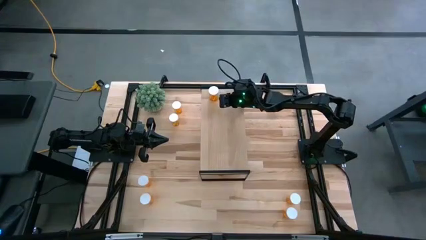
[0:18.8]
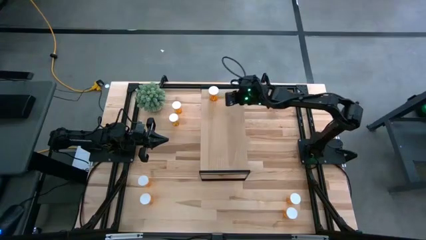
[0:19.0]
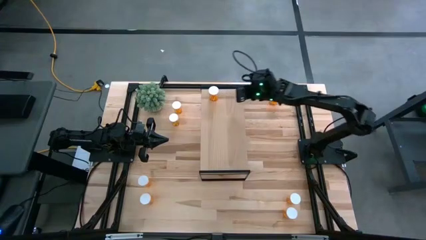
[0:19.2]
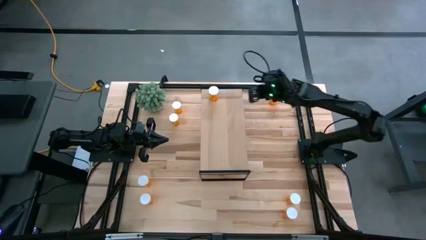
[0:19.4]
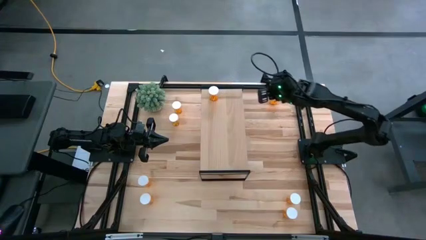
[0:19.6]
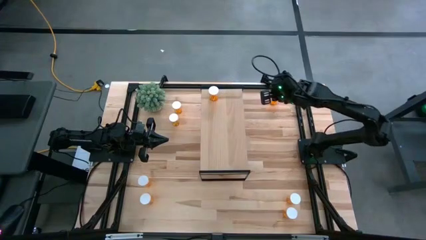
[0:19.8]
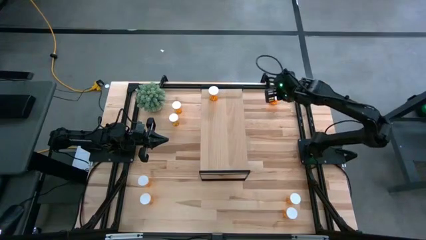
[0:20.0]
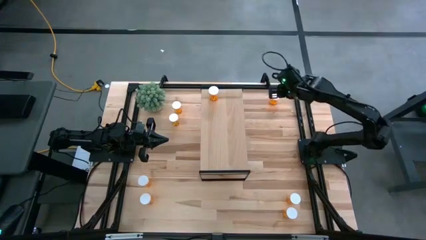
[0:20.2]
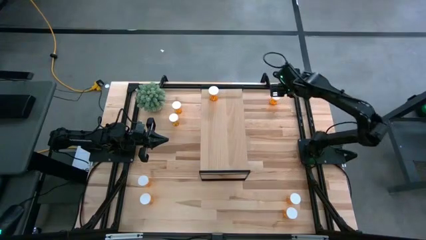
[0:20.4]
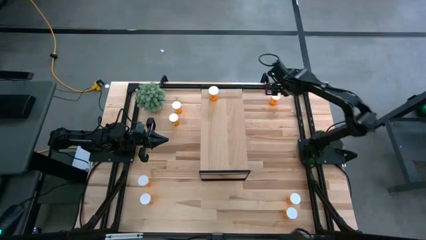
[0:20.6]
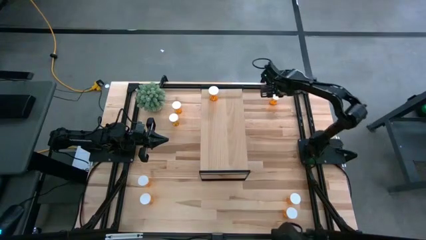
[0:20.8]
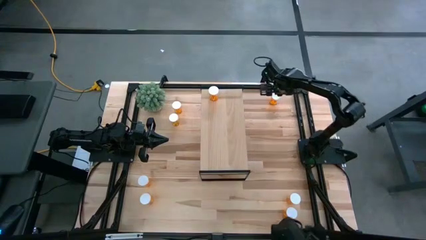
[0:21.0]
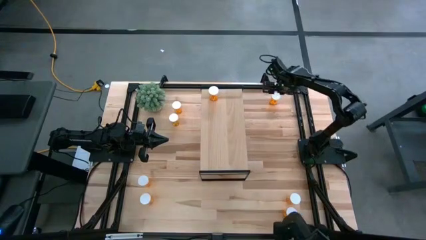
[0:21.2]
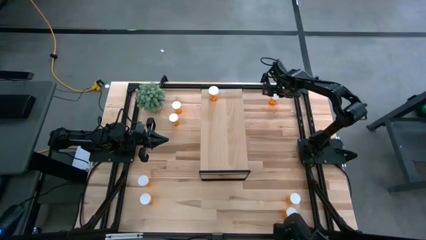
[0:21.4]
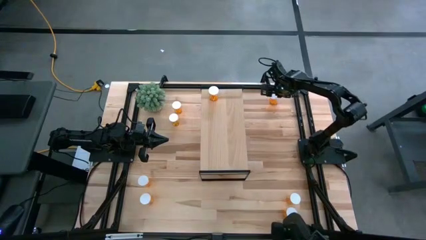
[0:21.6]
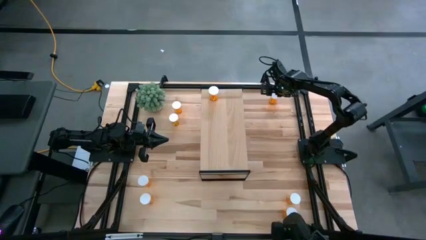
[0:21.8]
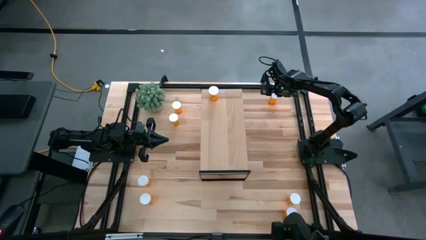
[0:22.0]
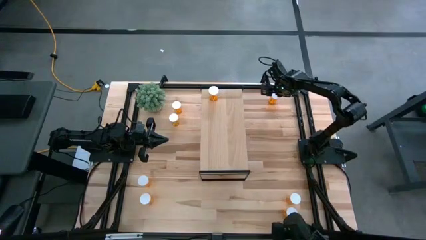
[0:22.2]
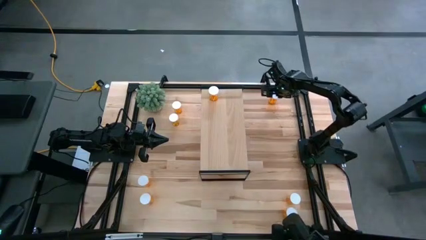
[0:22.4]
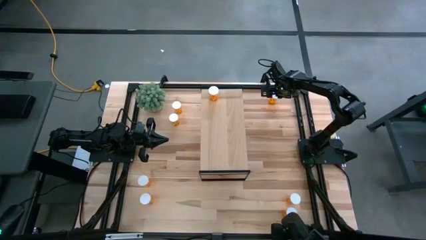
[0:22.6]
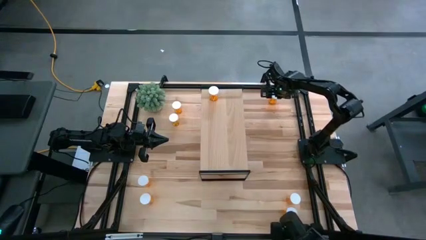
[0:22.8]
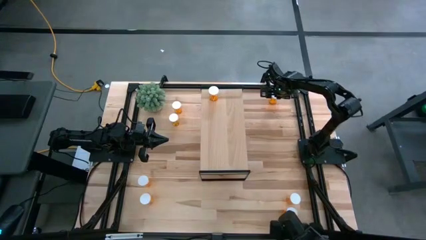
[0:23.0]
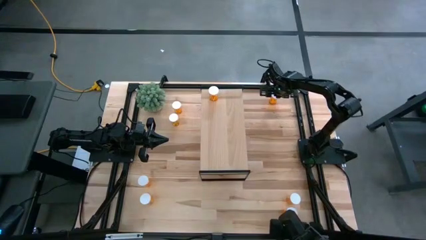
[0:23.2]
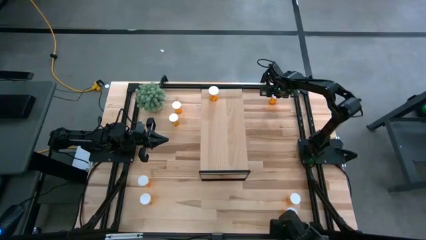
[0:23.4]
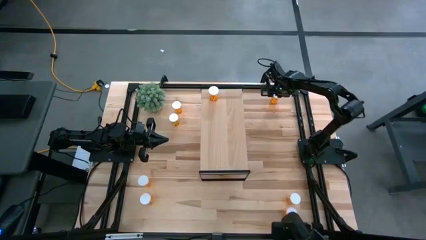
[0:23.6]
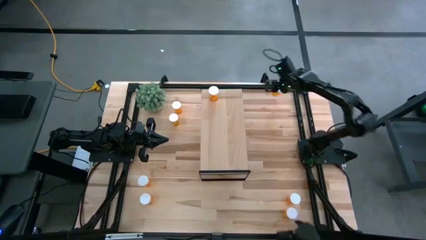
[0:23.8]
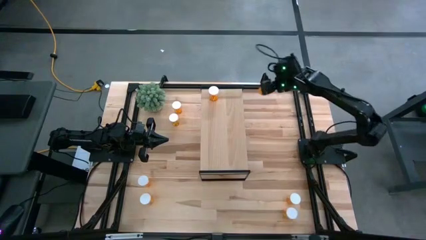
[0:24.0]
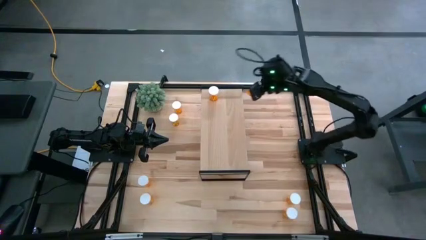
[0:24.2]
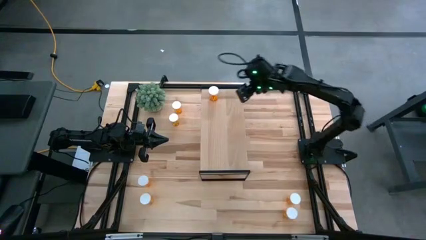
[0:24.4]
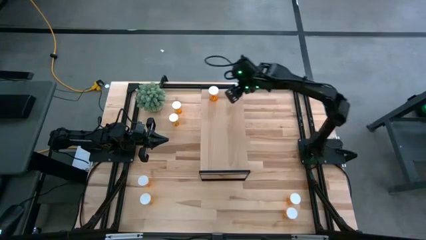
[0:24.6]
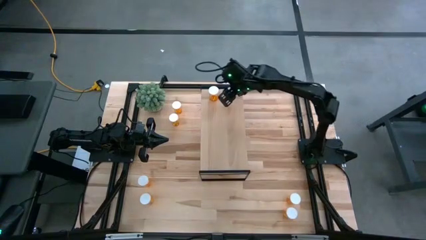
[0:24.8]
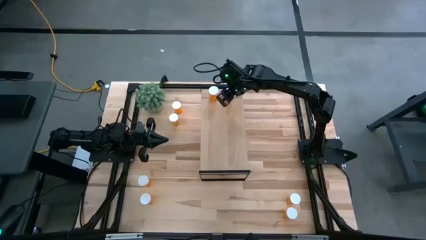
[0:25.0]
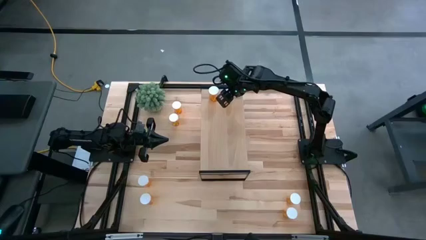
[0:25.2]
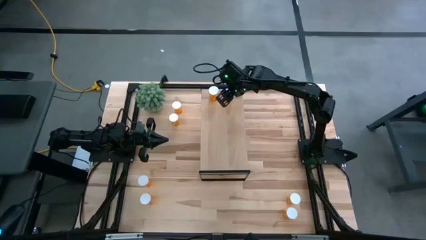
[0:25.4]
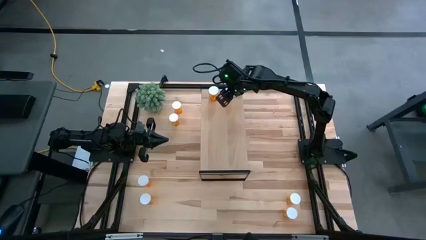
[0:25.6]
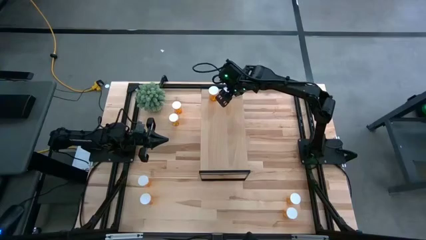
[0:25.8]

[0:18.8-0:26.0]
Task: Pick and place medicine bottles onto shelf by color
Put the orange pill bottle on the shelf

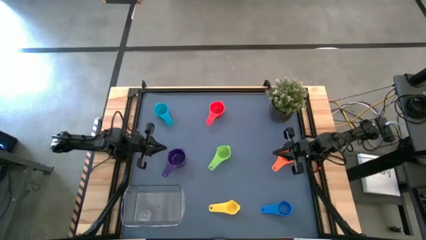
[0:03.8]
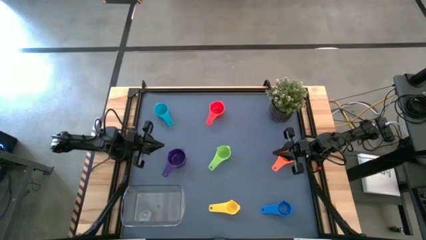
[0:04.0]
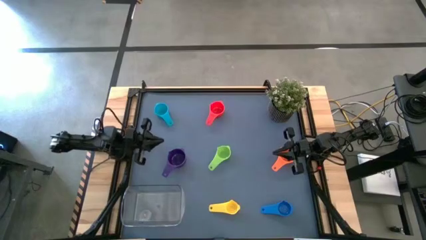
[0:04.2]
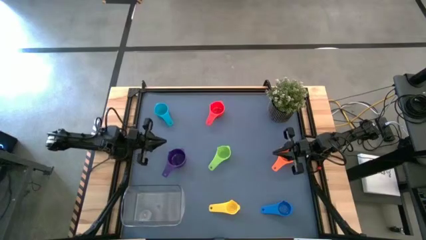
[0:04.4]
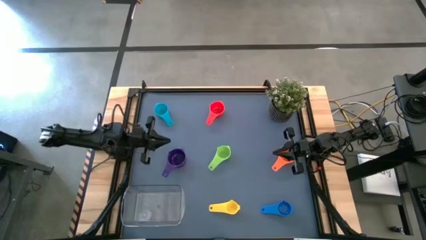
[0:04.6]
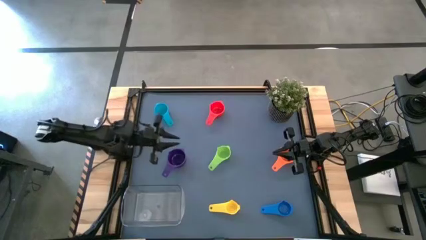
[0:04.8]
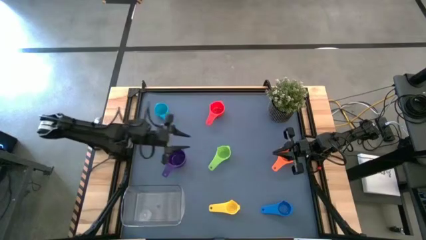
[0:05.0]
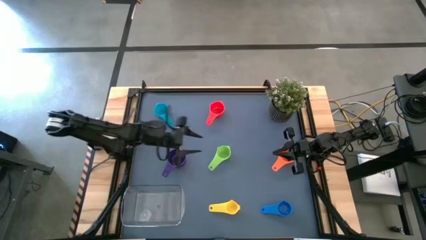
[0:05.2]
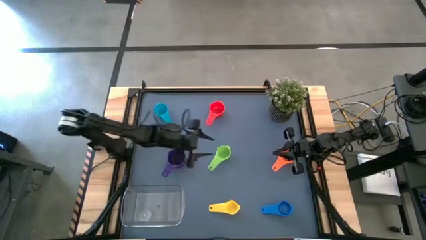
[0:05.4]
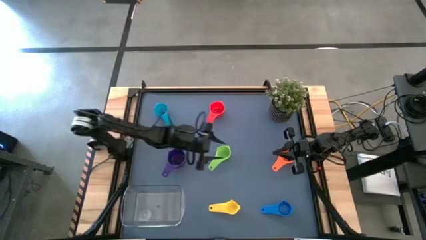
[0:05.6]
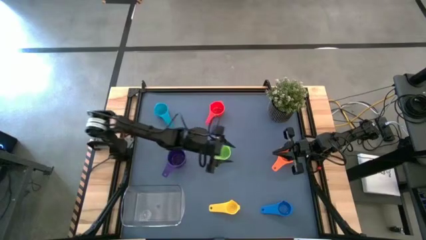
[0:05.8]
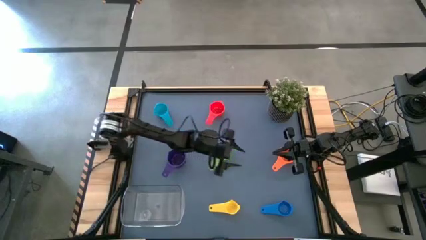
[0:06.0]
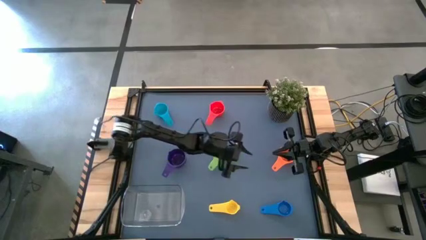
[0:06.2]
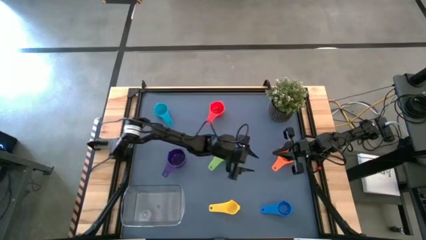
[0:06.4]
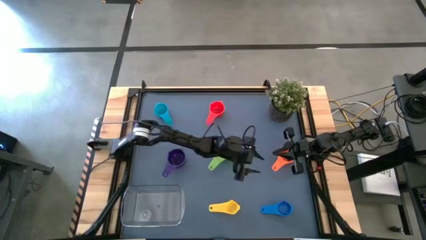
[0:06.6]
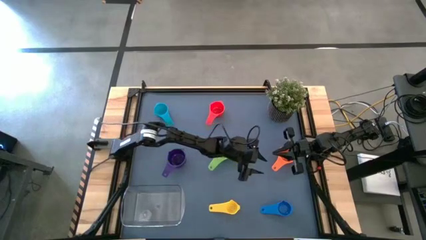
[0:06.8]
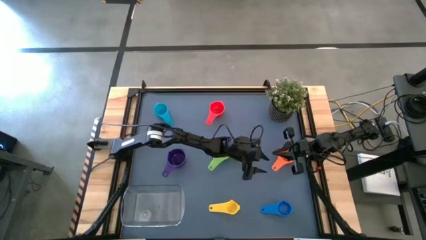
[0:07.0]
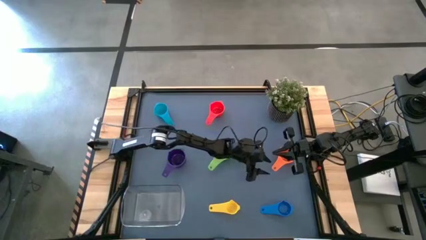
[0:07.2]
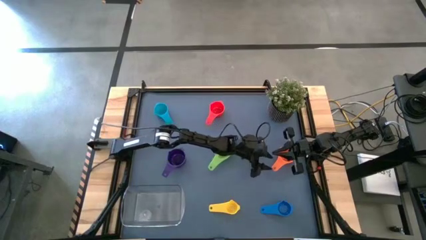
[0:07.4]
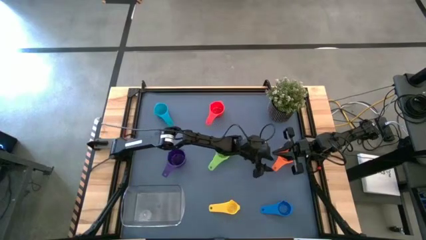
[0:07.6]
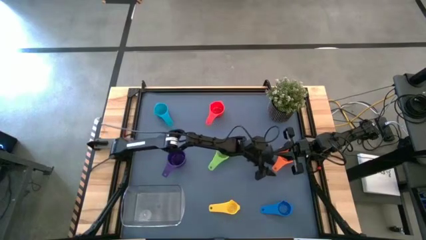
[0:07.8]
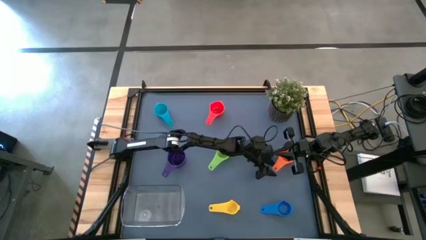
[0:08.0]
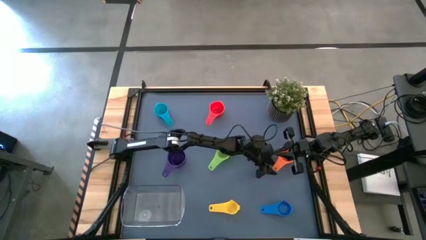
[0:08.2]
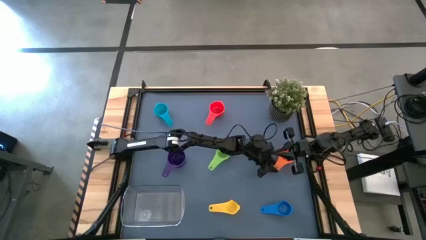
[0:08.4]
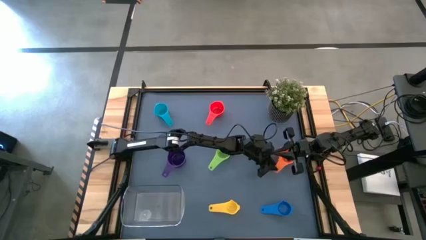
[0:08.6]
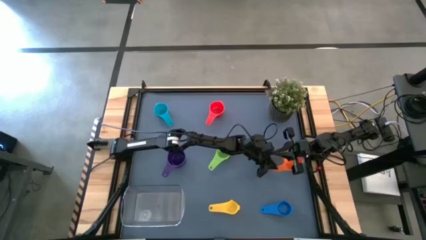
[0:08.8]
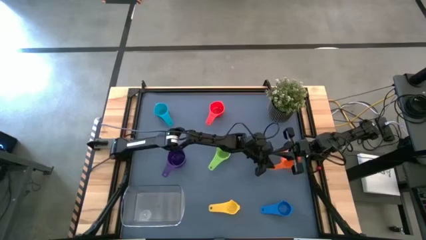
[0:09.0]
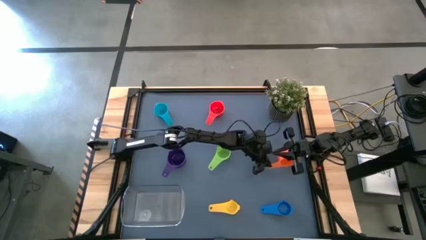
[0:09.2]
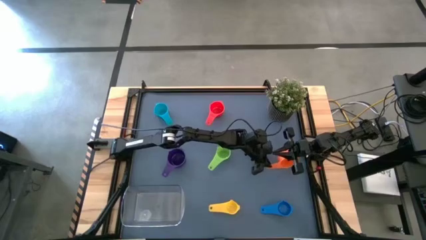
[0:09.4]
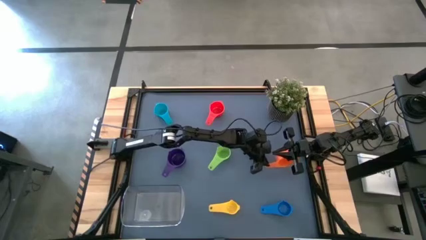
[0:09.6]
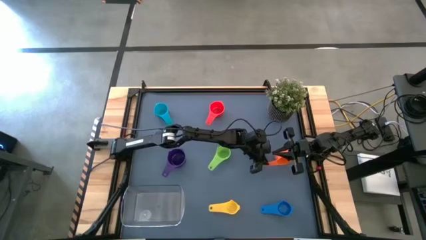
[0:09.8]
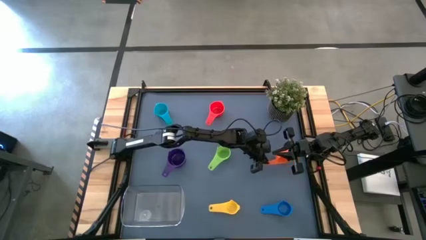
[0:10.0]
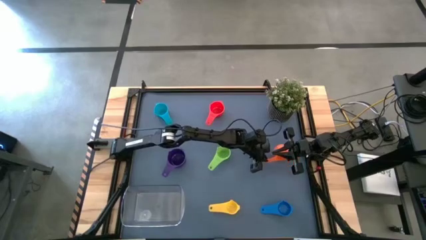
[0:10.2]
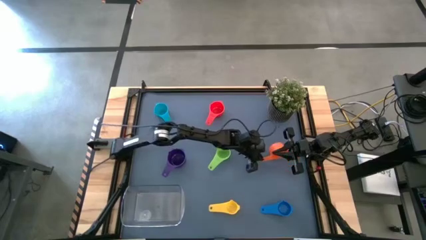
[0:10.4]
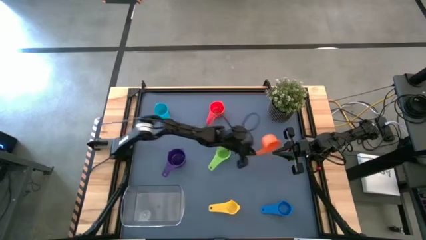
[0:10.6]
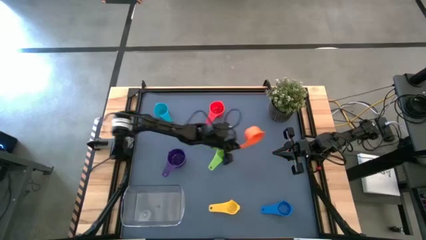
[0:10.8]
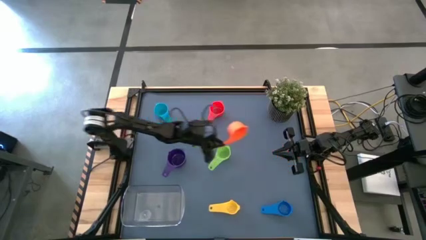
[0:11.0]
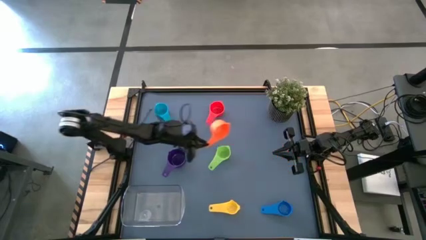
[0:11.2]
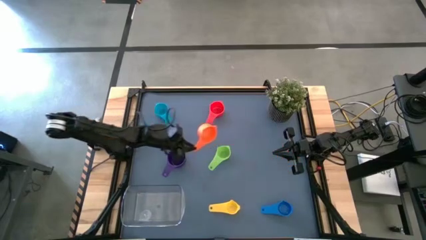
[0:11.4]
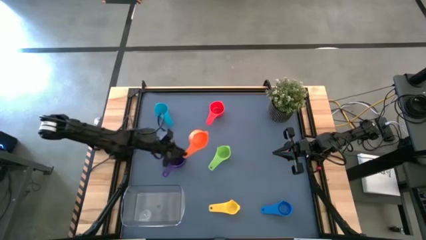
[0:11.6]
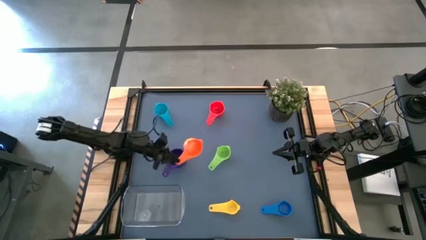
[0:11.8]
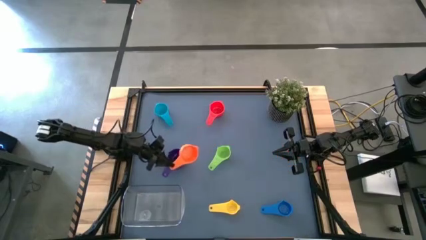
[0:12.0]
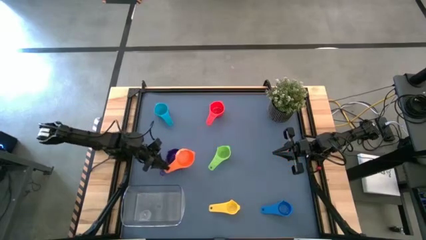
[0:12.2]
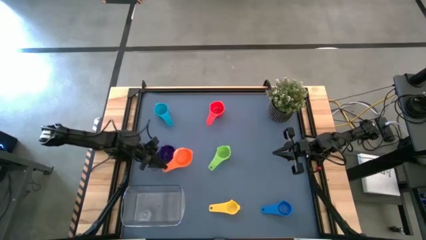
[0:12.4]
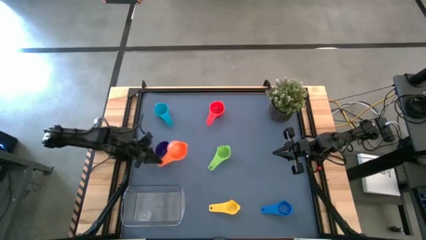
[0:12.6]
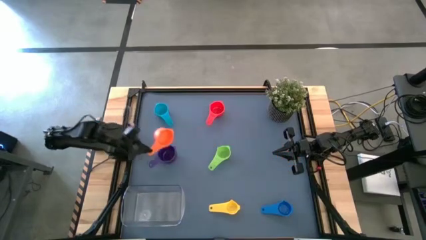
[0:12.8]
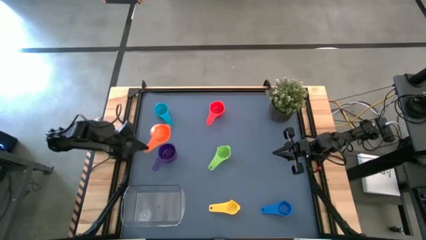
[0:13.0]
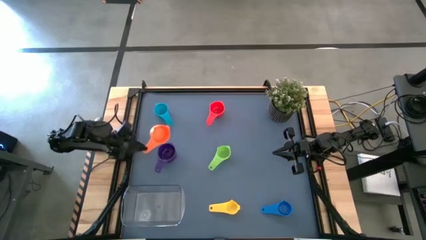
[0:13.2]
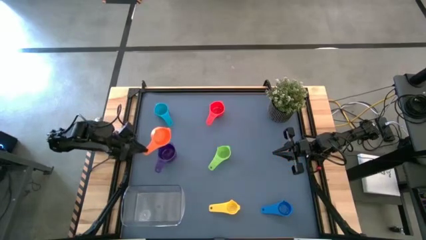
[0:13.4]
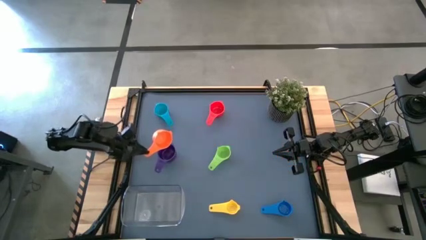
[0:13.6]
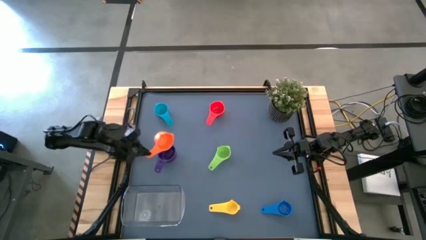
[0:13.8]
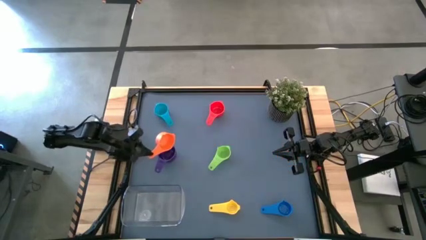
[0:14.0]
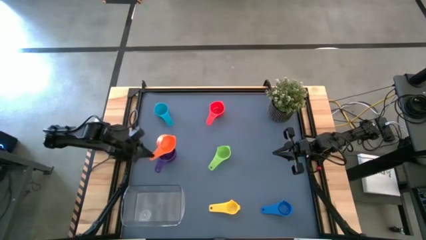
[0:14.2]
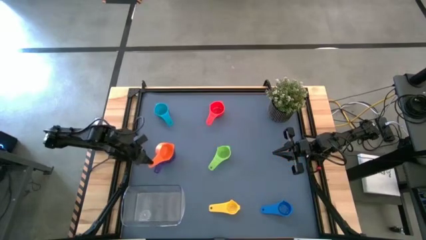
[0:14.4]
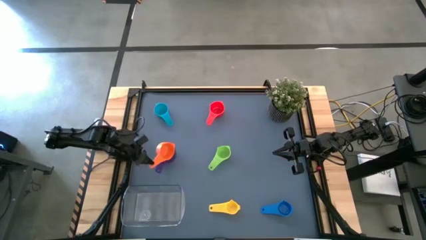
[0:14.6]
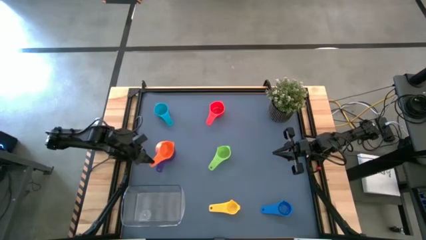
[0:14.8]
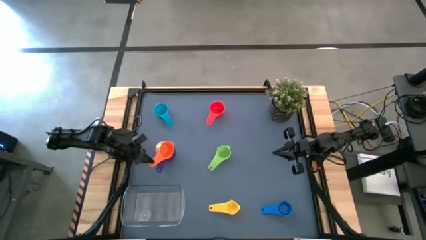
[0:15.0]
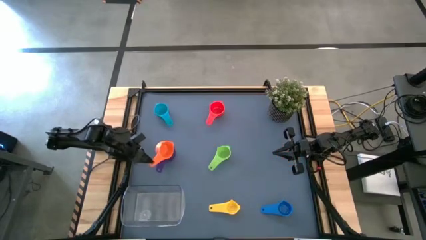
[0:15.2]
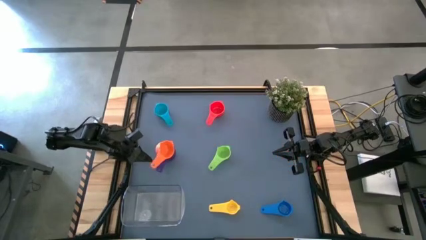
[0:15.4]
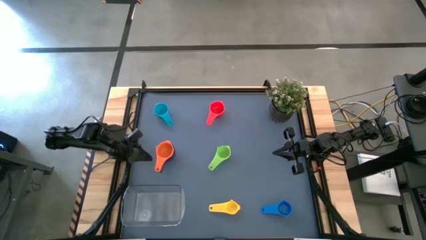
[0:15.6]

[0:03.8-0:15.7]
Task: Nest measuring cups in basket
Stack the orange measuring cup on top of the violet measuring cup
